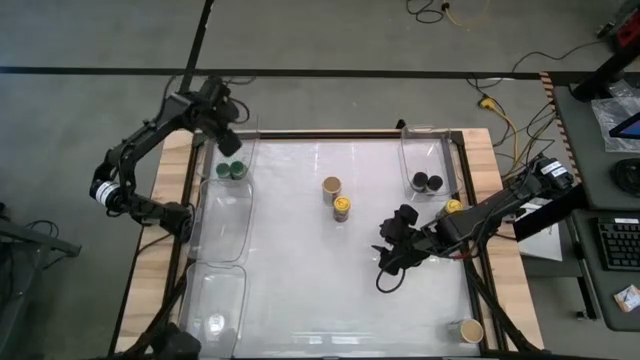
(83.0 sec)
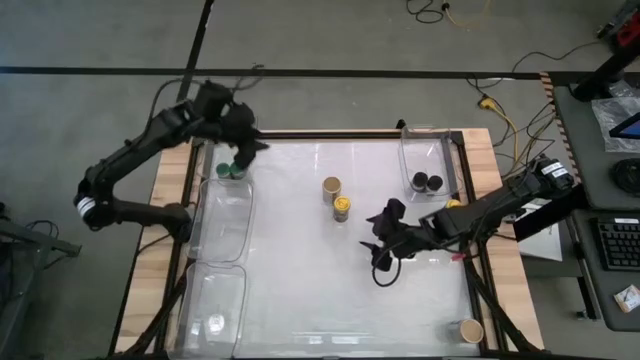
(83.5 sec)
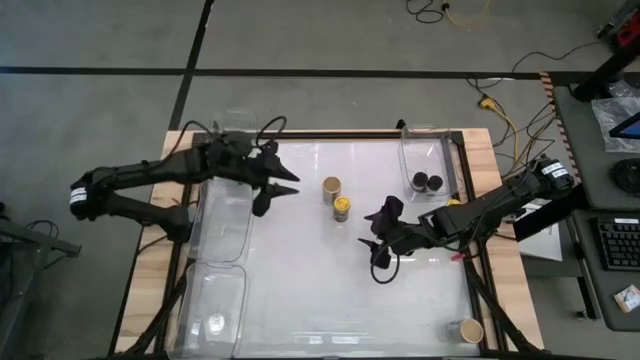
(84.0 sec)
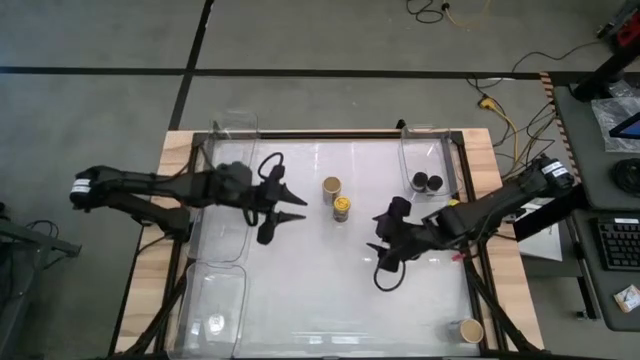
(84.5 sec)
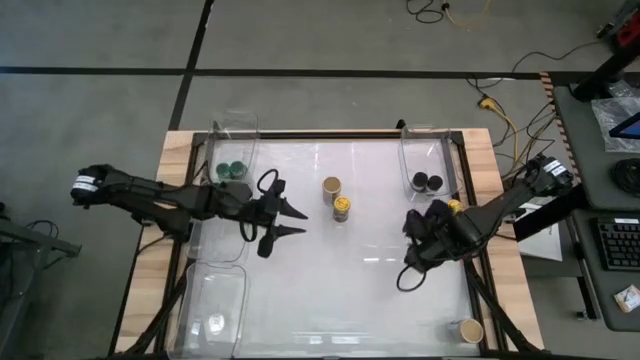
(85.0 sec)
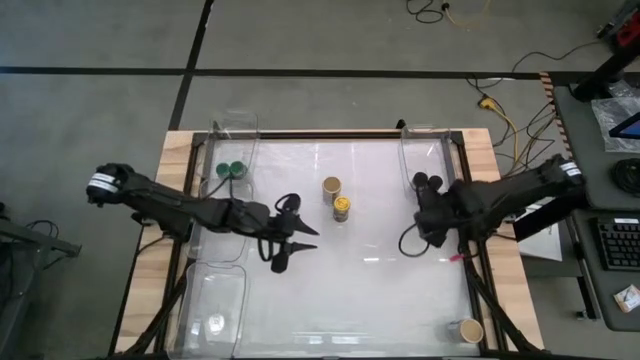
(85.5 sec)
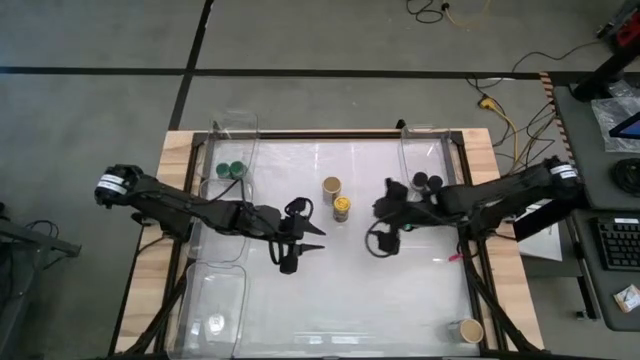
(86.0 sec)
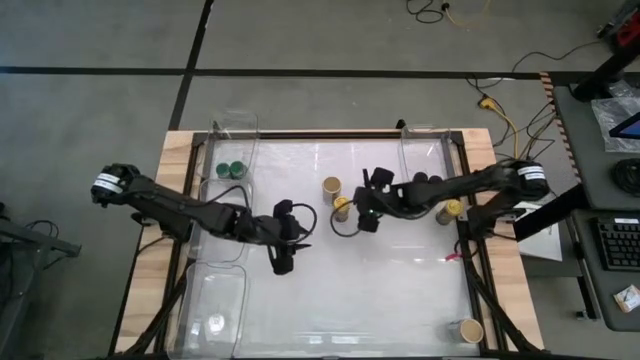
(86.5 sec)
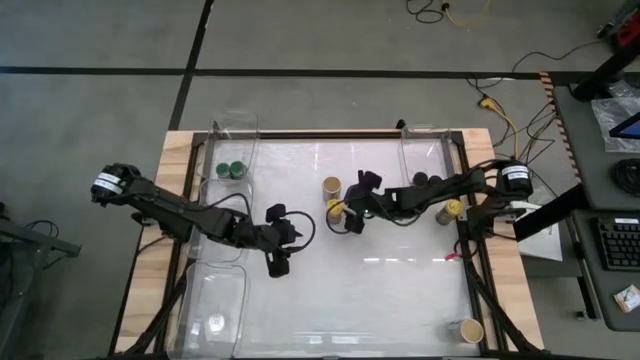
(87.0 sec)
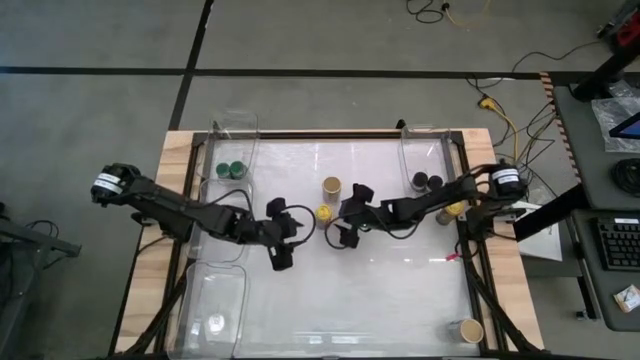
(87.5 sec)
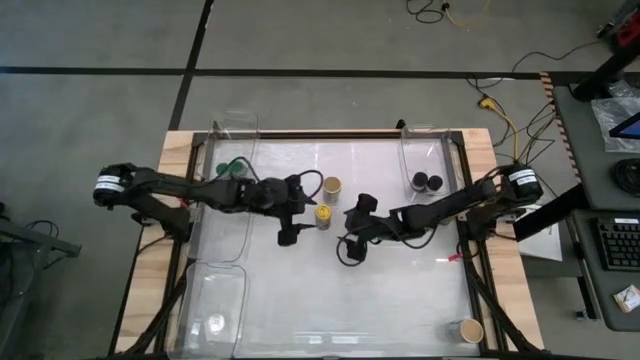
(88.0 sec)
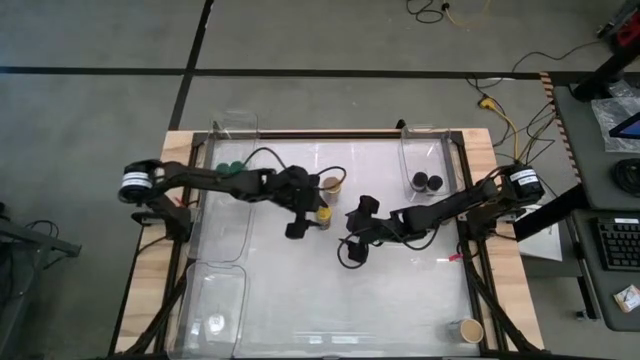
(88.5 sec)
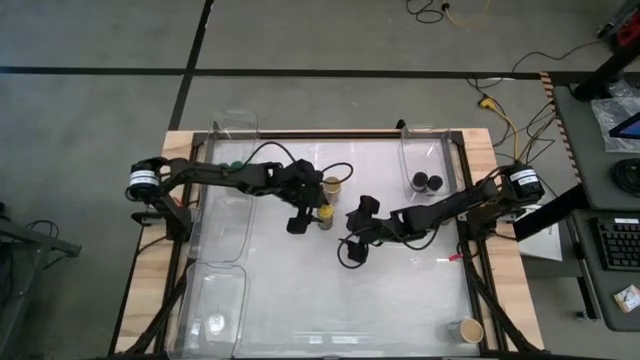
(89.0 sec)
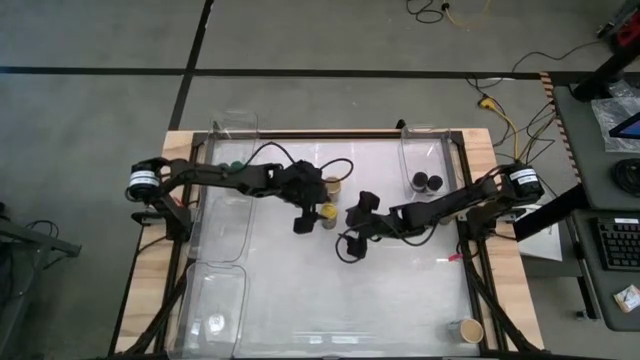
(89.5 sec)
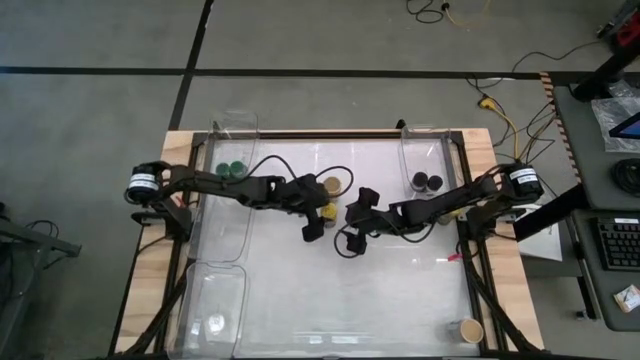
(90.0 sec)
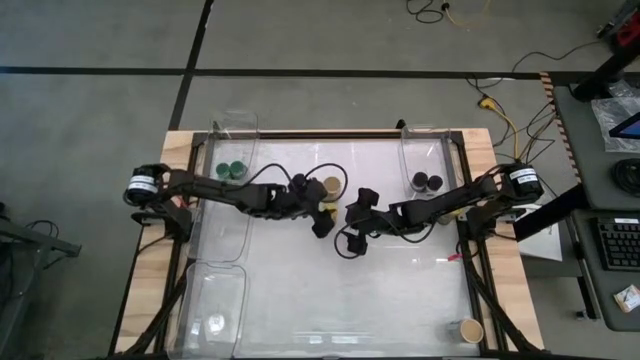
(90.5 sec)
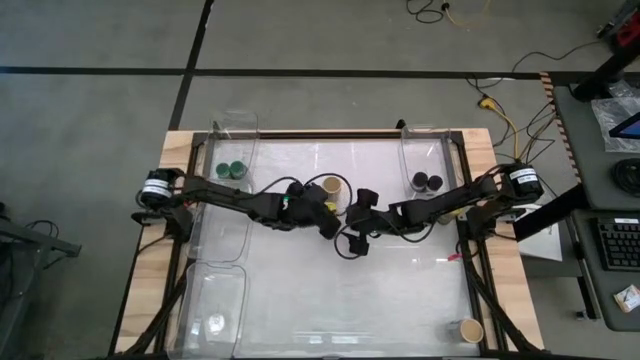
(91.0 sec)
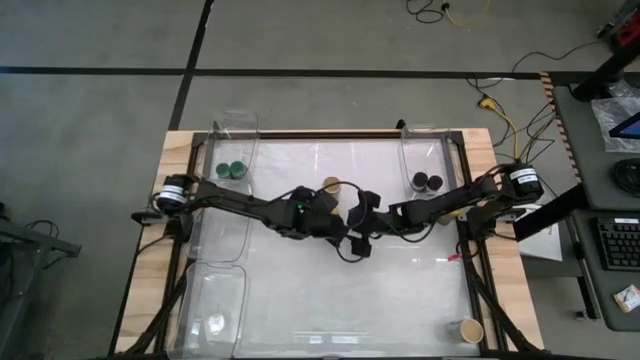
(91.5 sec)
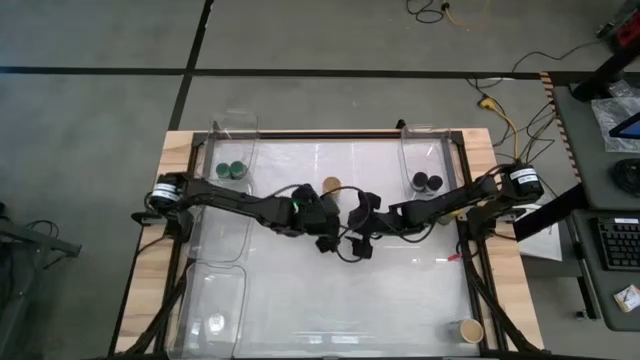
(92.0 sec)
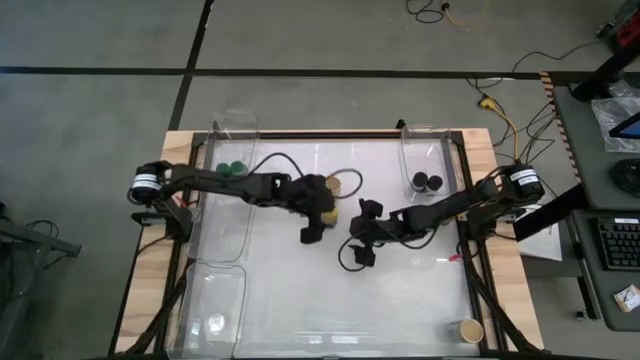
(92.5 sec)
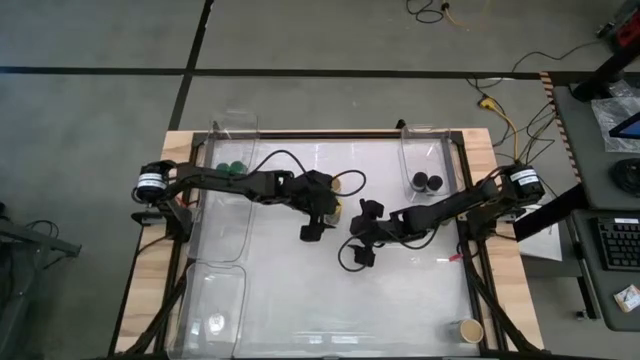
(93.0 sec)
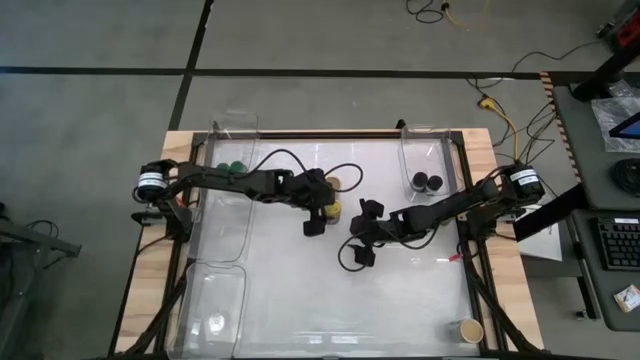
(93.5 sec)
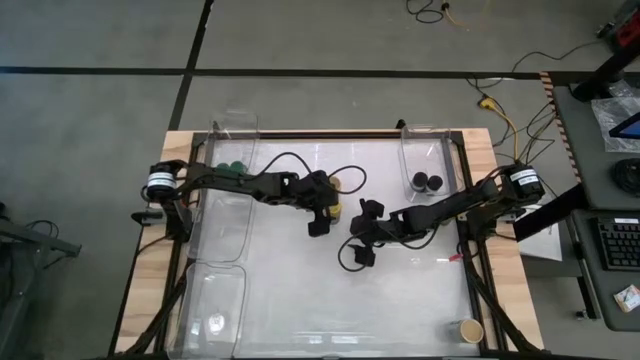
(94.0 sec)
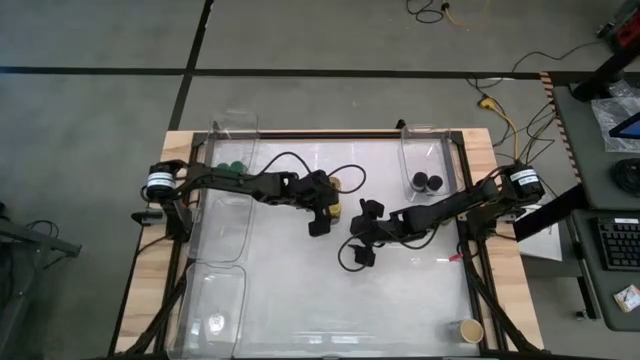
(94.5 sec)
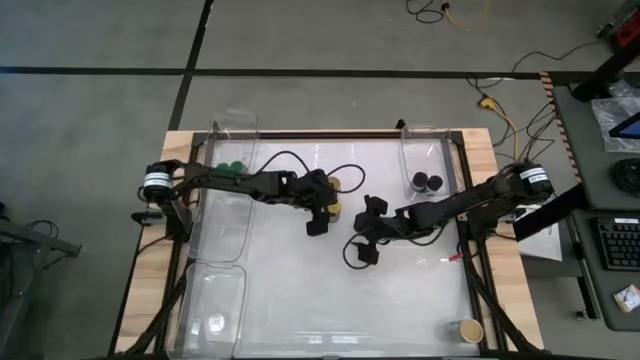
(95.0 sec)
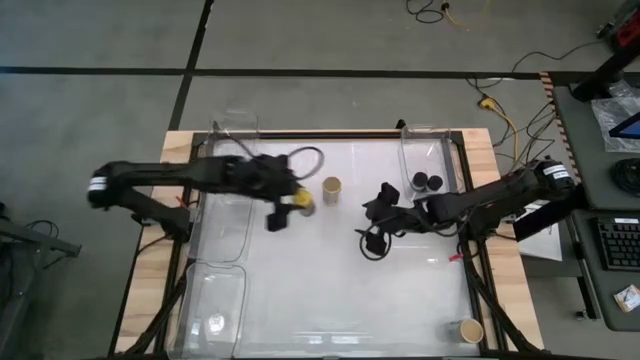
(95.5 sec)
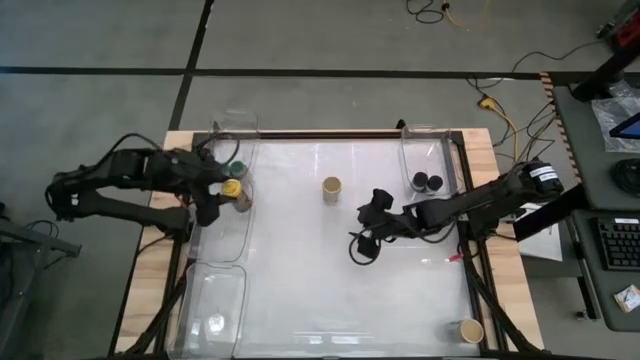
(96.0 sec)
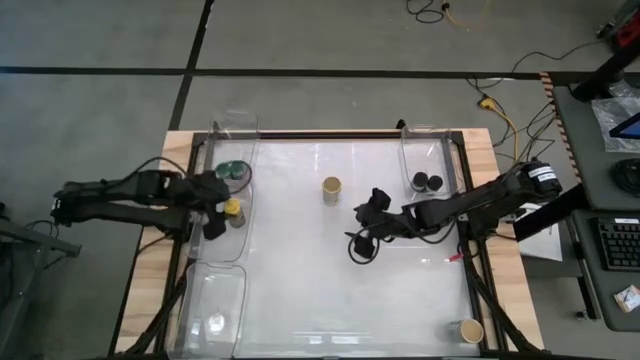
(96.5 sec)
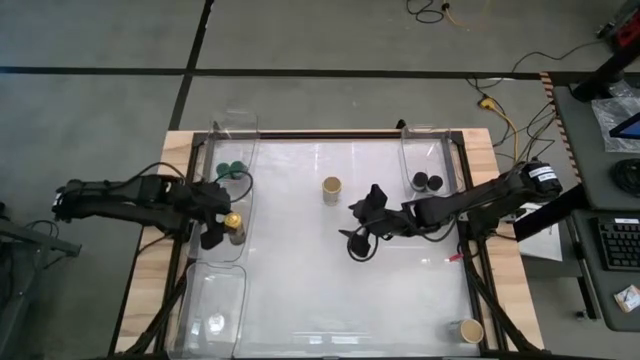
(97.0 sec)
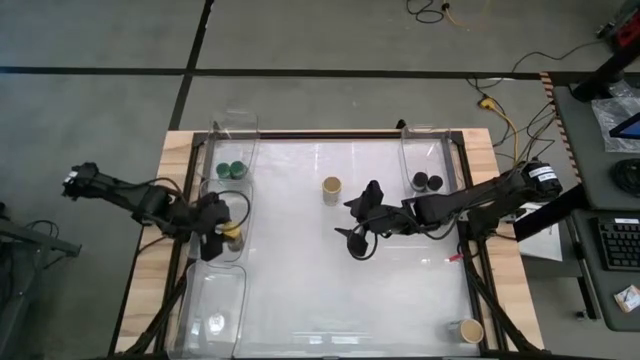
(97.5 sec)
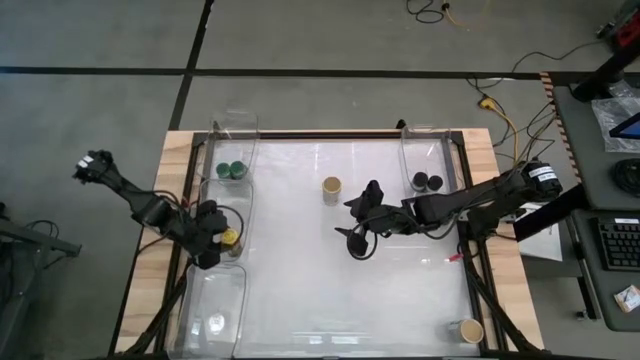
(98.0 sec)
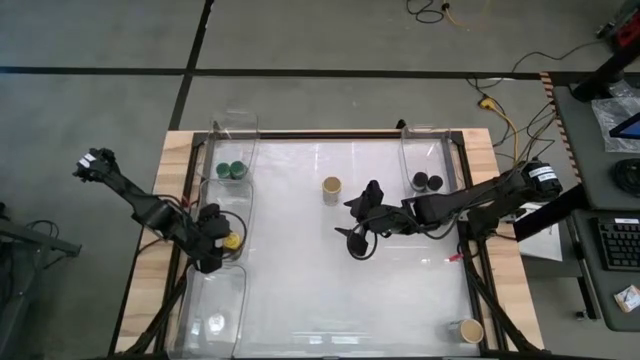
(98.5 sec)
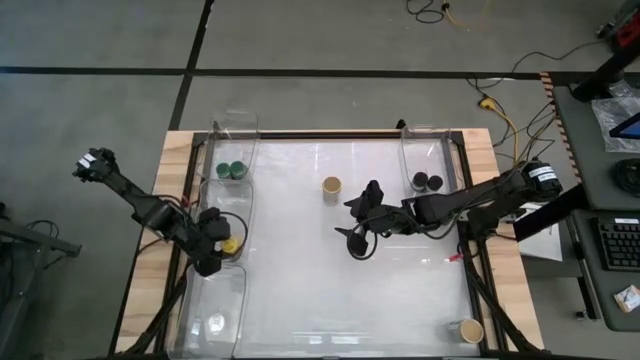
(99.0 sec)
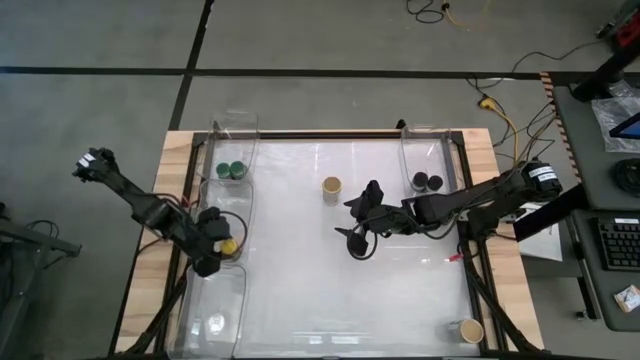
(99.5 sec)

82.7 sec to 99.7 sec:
Task: Sort spices by type
Move the left yellow spice bottle a few centimeters away from the other bottle

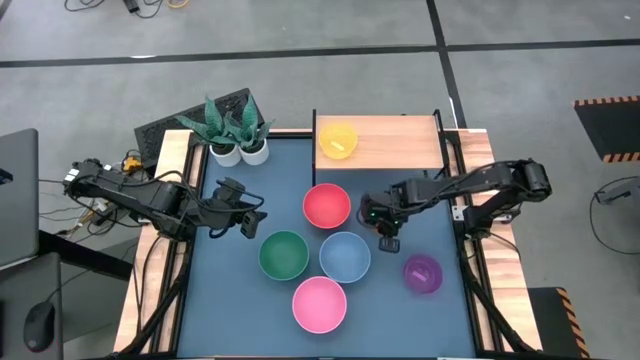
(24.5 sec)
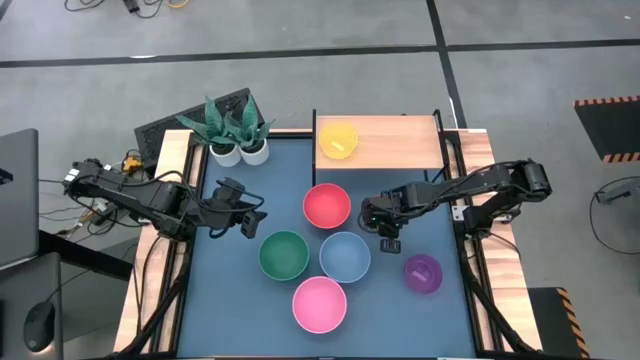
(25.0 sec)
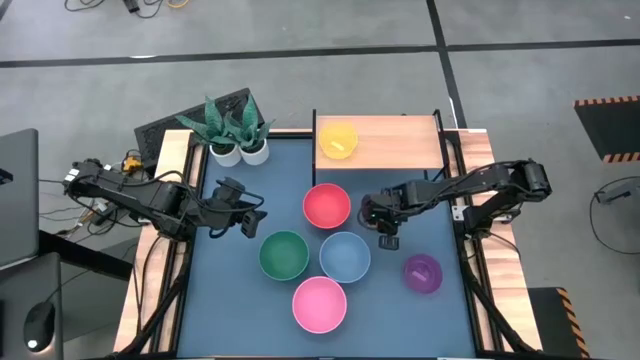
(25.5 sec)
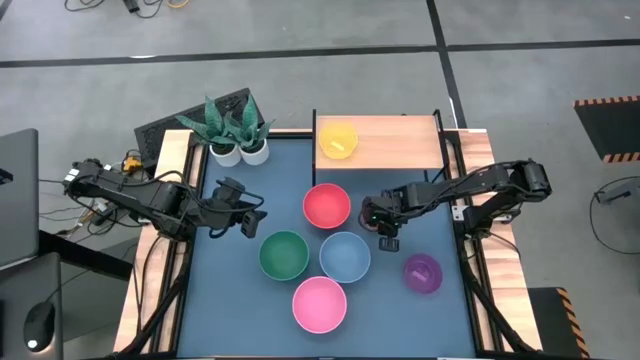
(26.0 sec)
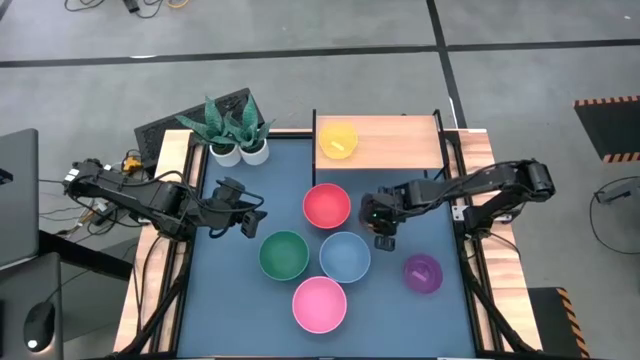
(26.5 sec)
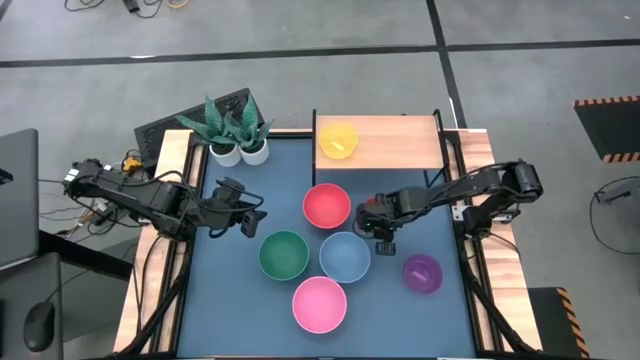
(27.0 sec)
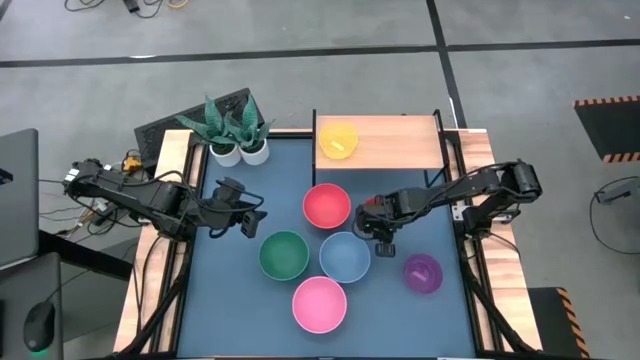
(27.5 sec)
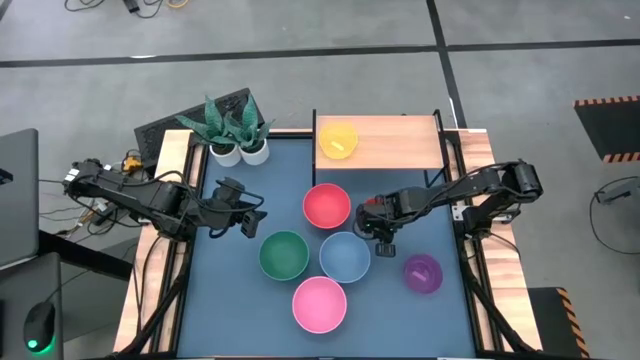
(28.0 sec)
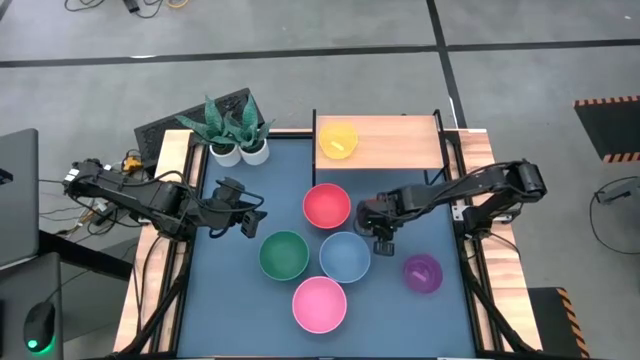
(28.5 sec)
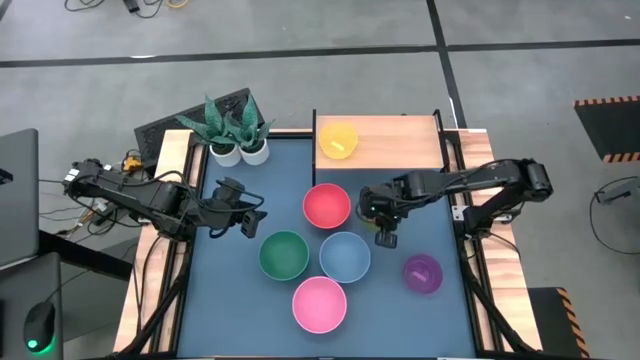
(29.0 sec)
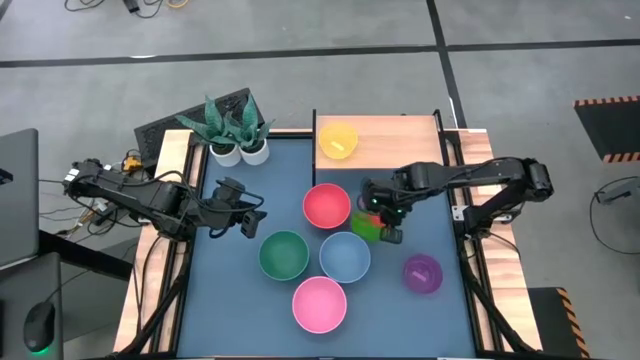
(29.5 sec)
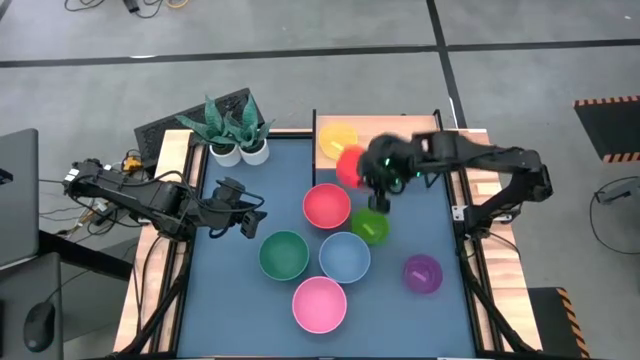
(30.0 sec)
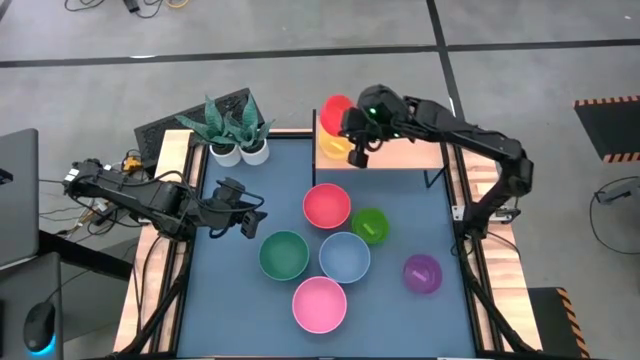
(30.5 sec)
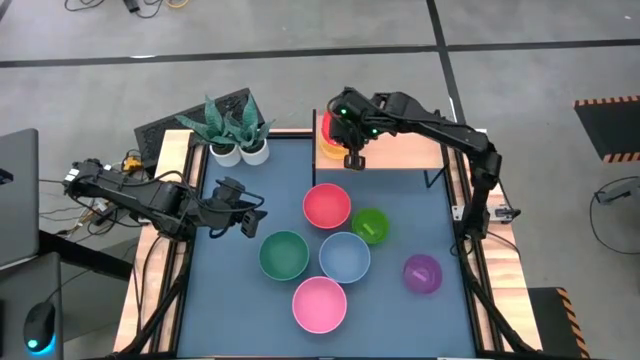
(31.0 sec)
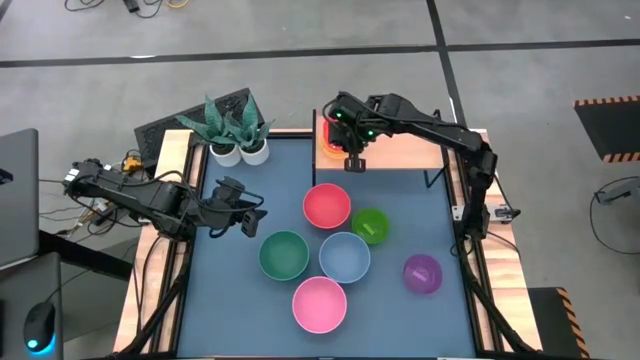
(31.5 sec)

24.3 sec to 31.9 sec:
Task: Place and stack bowls onto a shelf
Stack the orange transparent bowl on top of the yellow transparent bowl on the shelf
